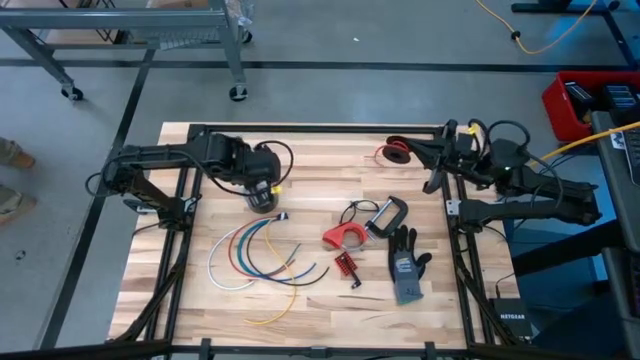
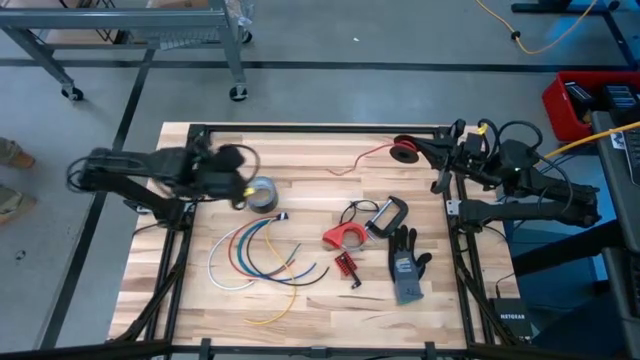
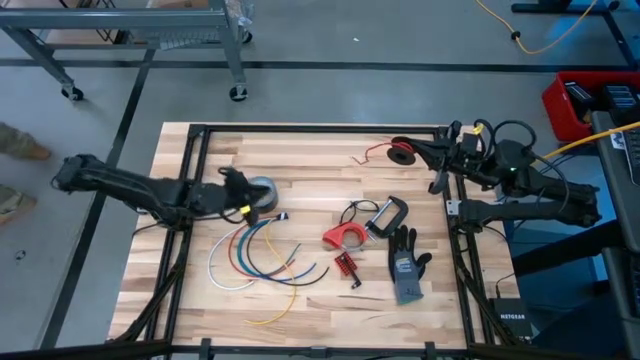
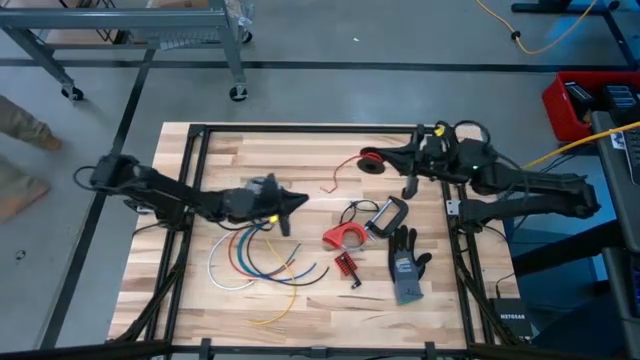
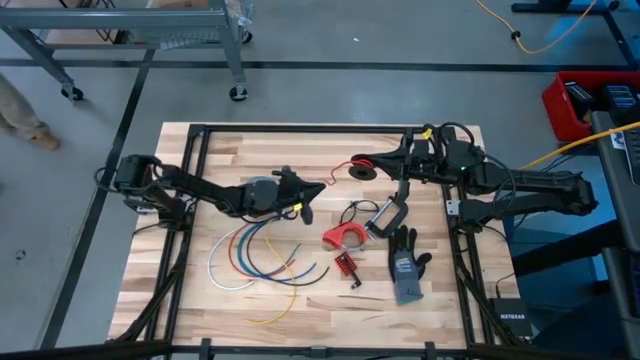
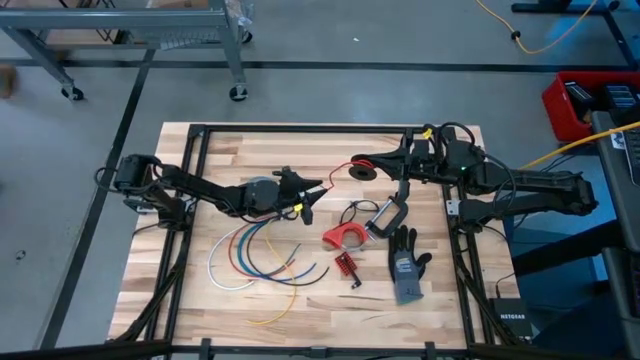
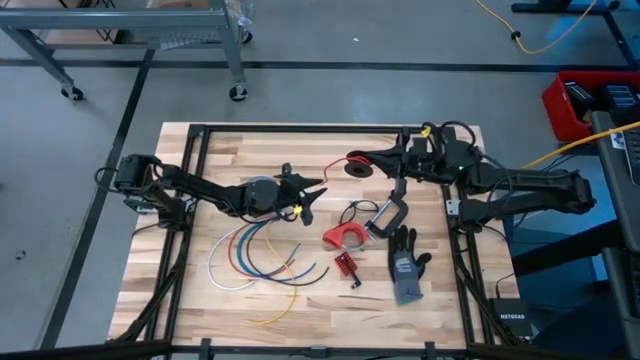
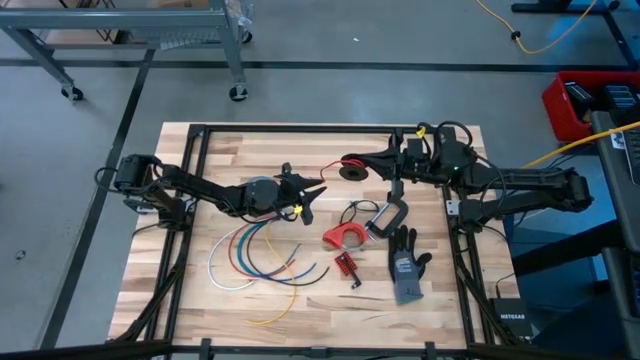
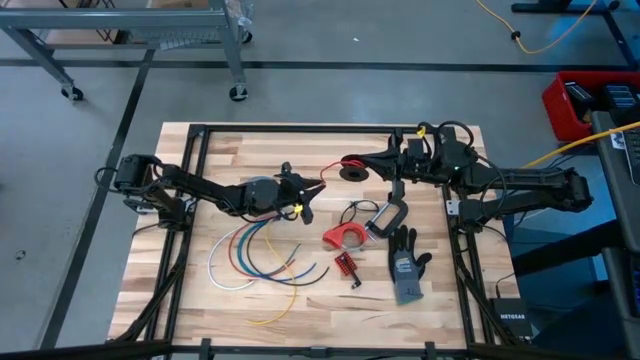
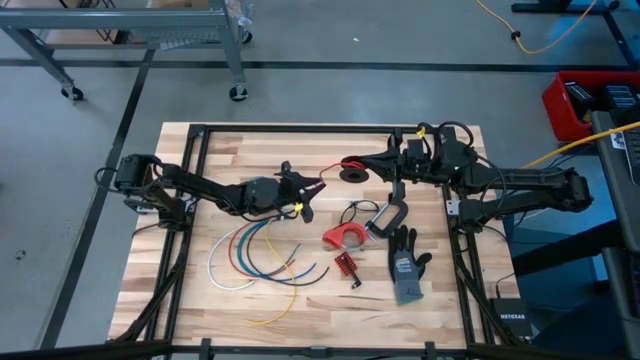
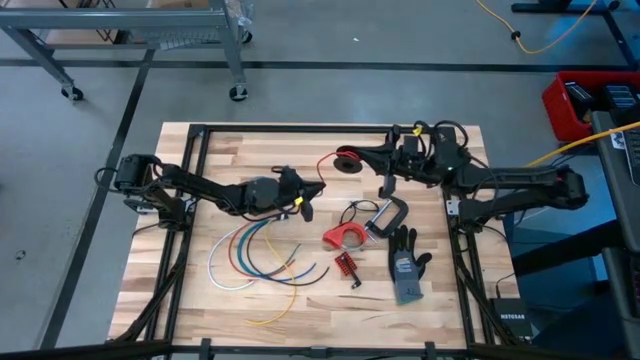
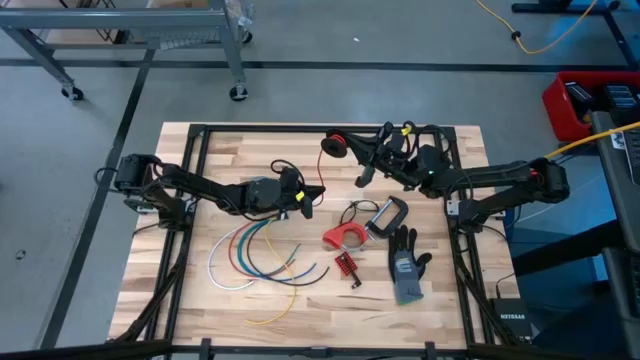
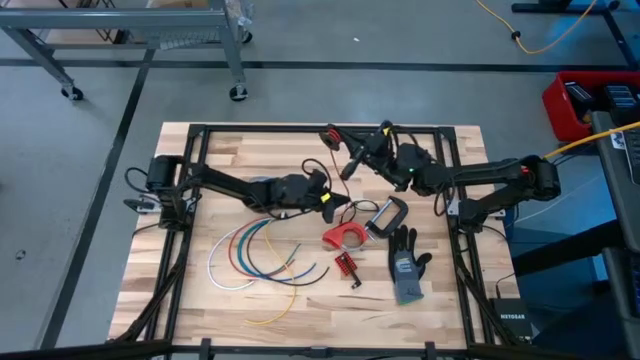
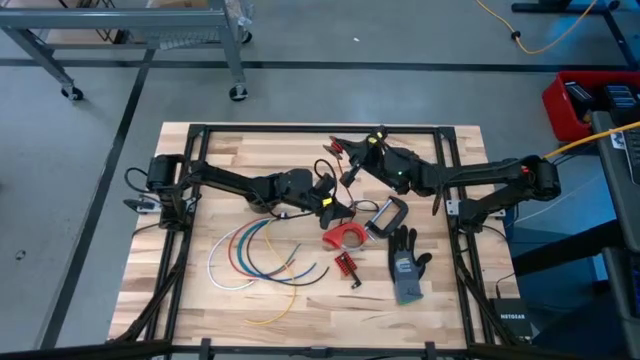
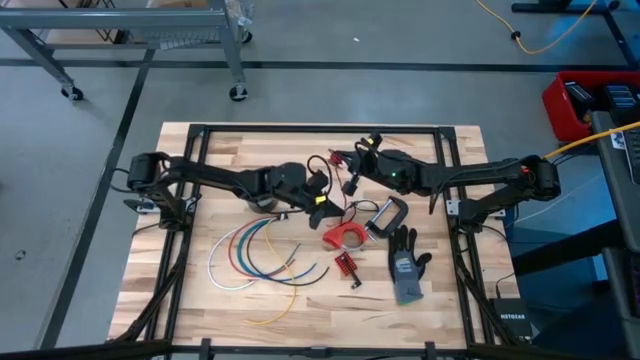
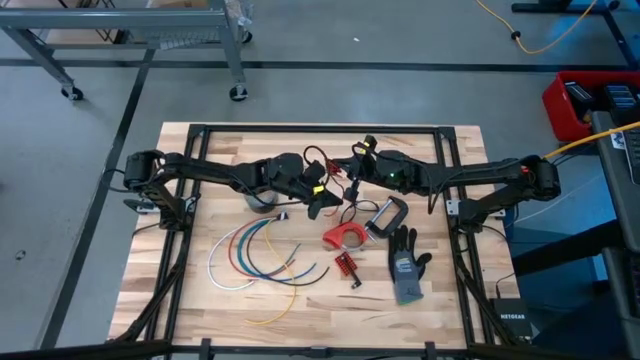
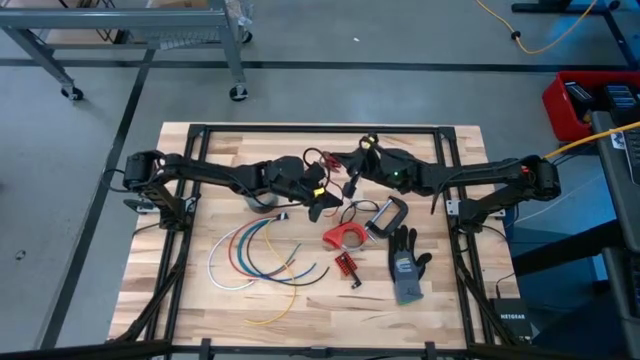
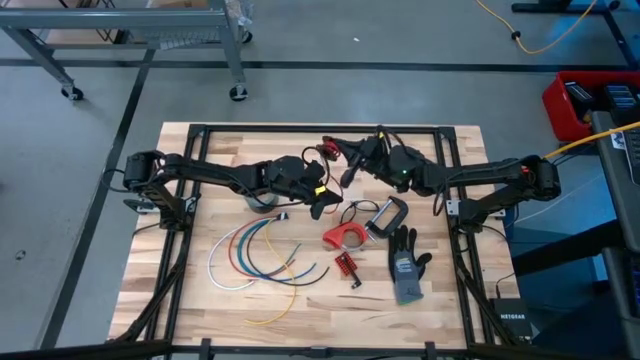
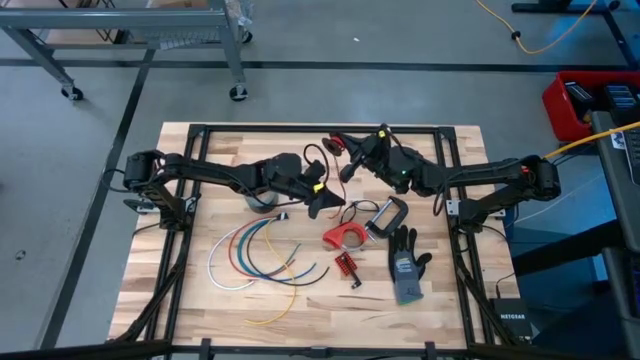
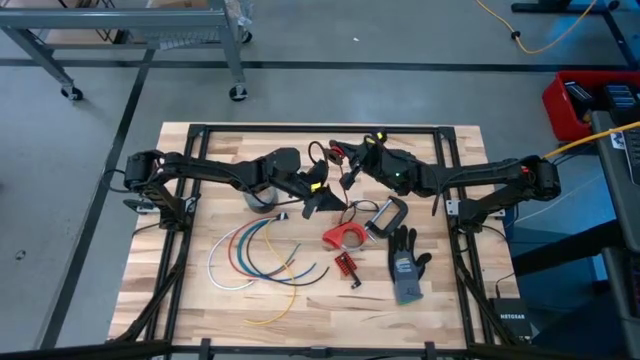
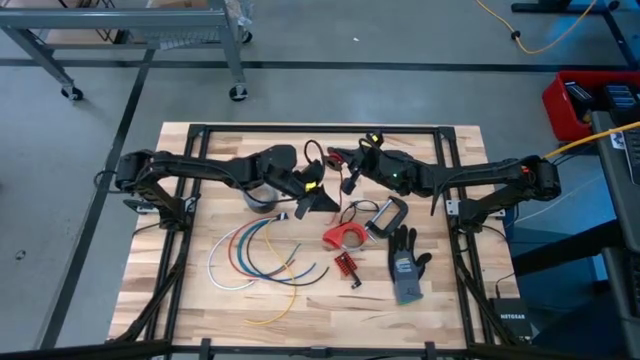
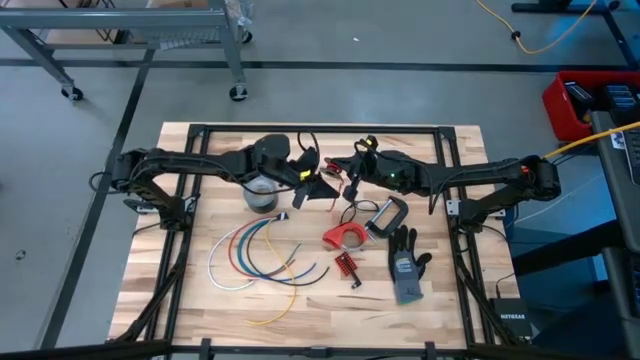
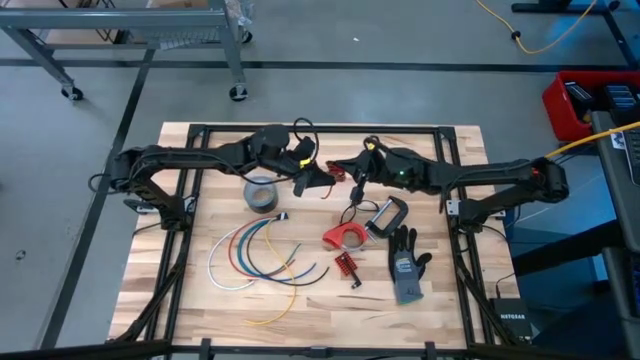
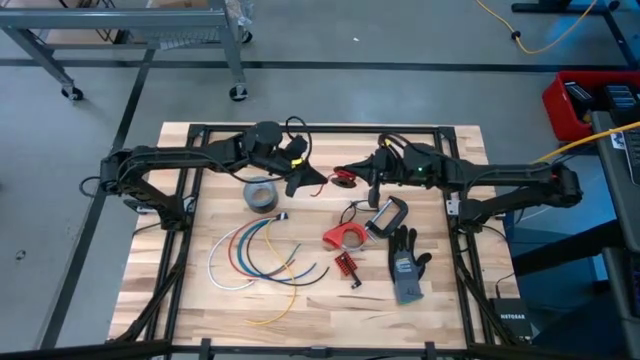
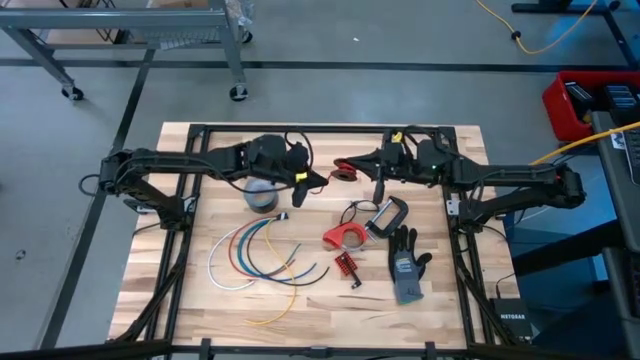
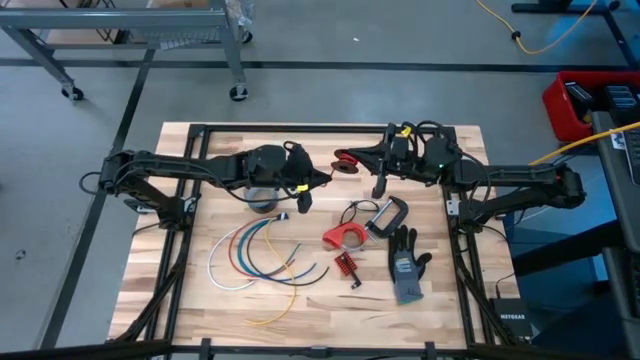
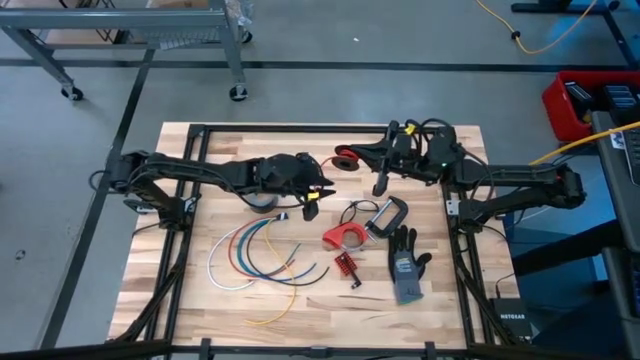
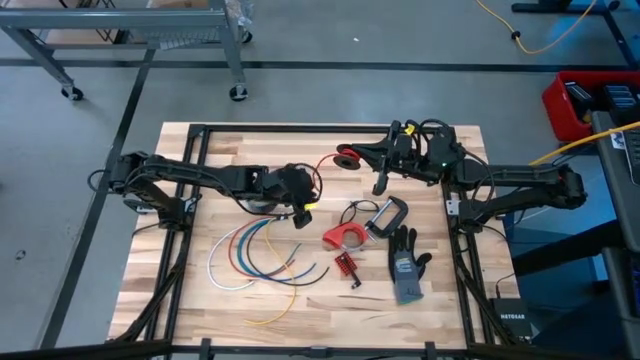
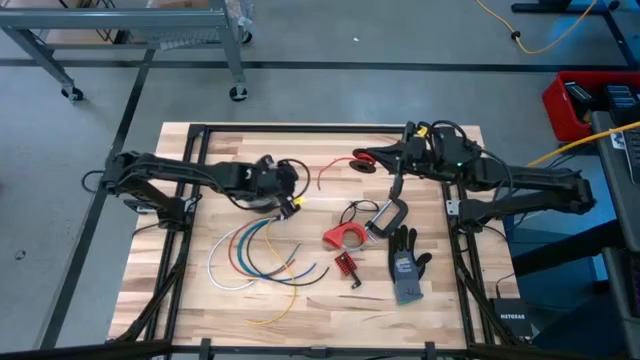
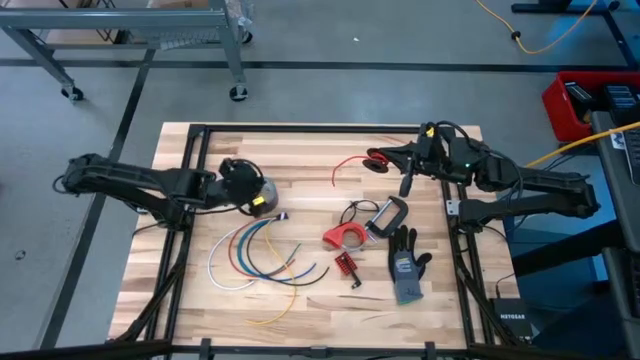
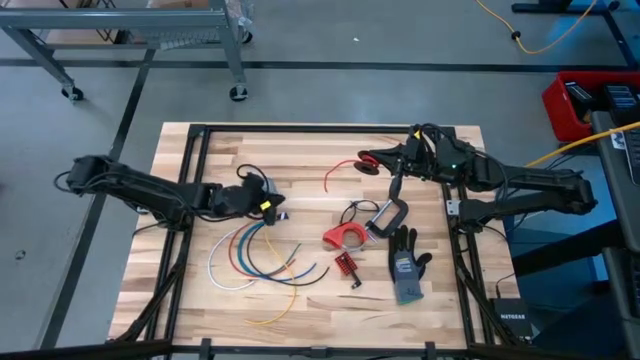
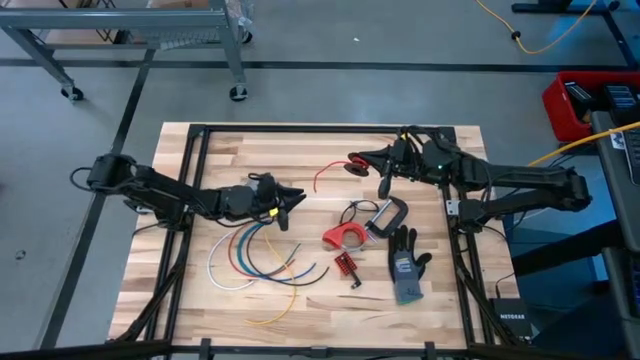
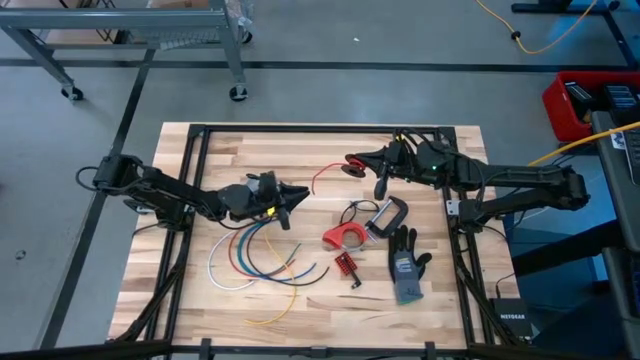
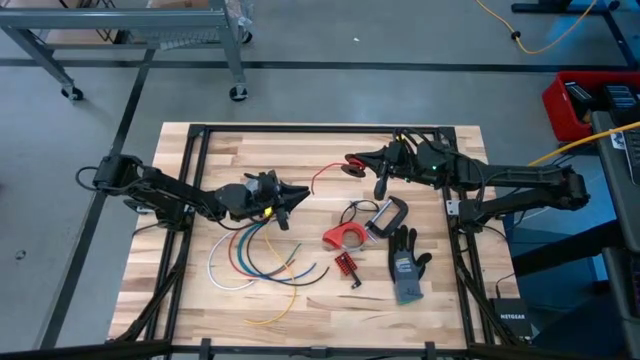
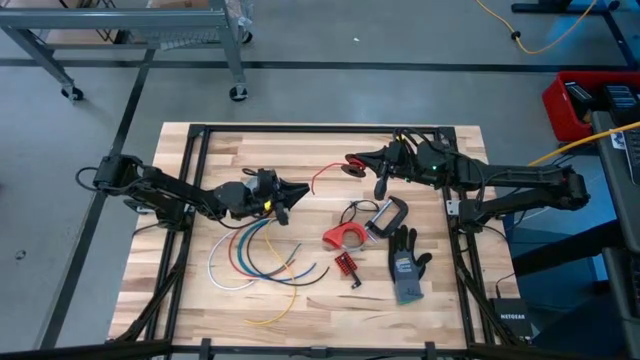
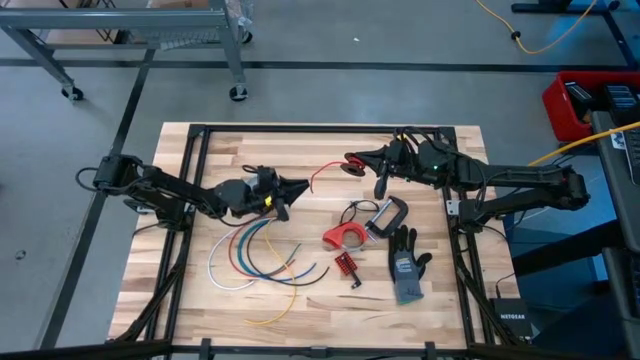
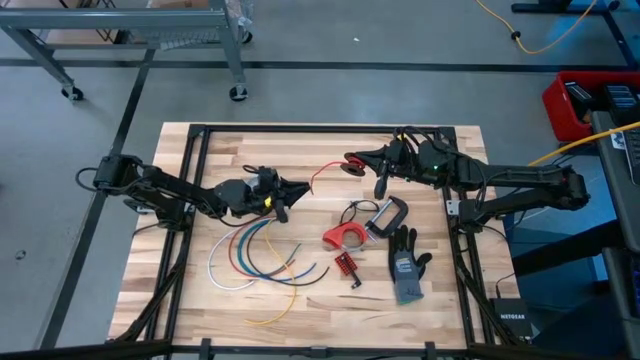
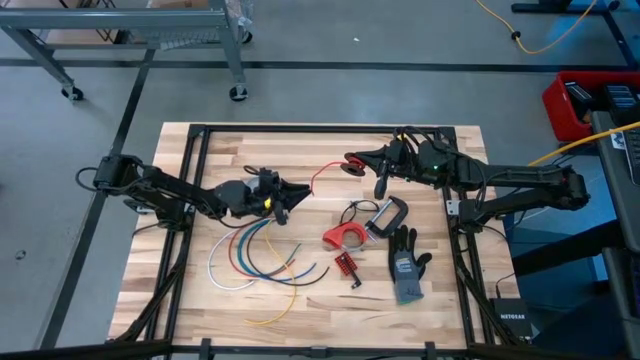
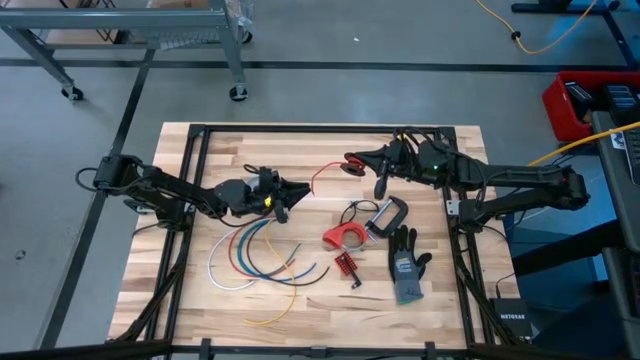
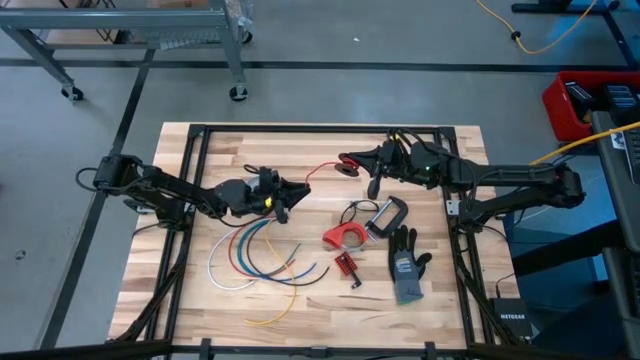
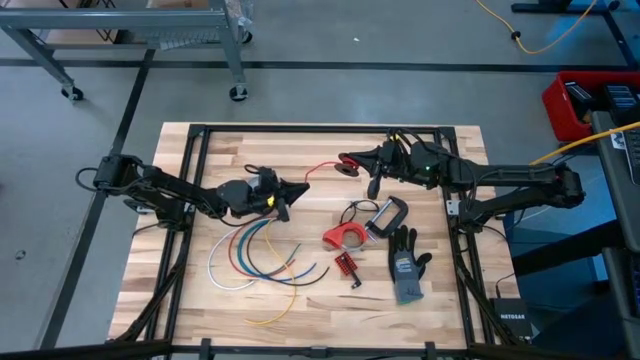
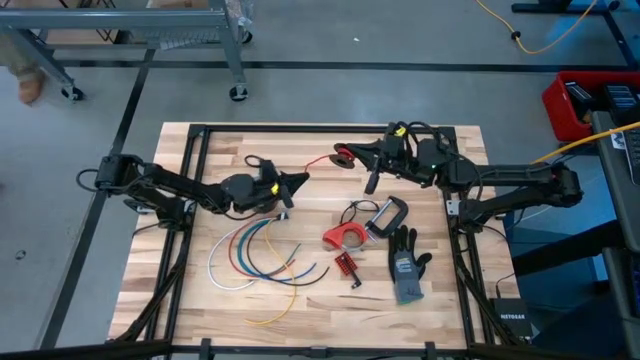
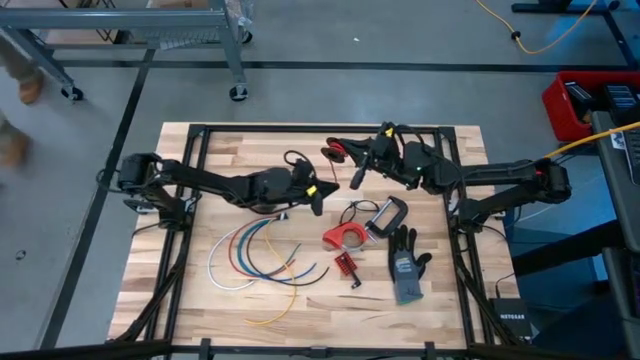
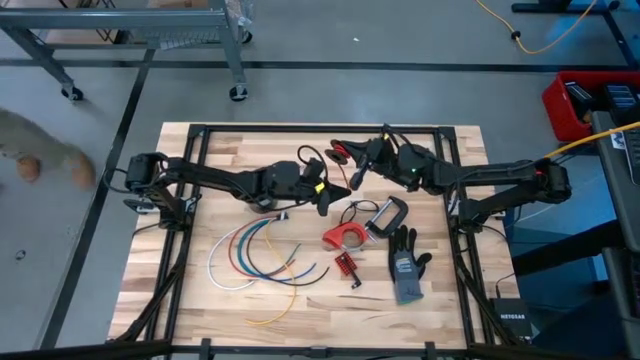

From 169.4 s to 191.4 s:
Task: Coil cords
Coil the red wire onto the spool
